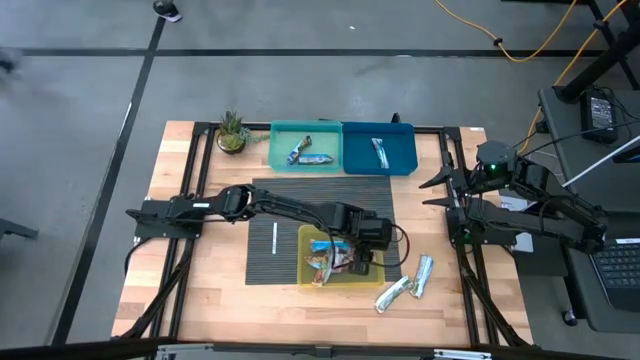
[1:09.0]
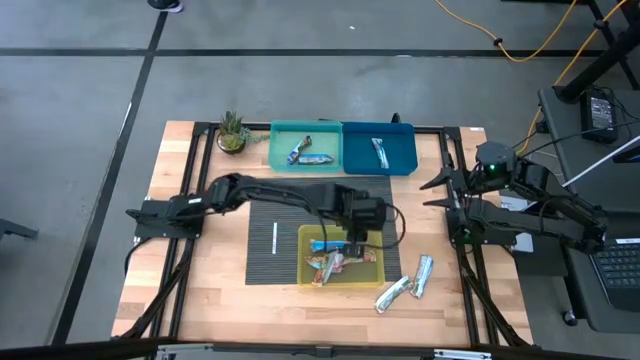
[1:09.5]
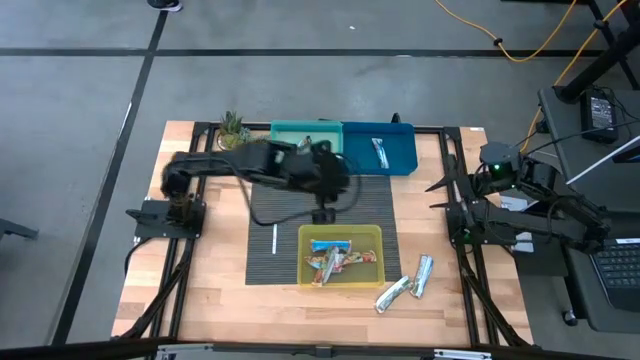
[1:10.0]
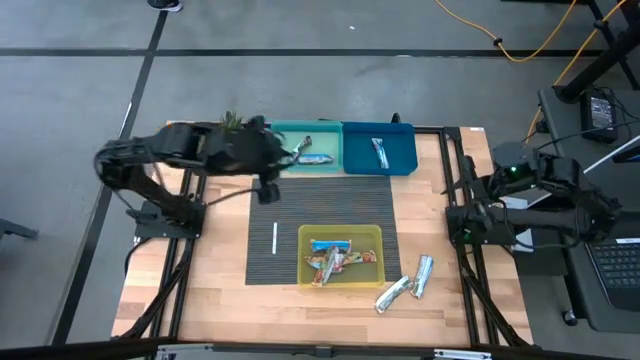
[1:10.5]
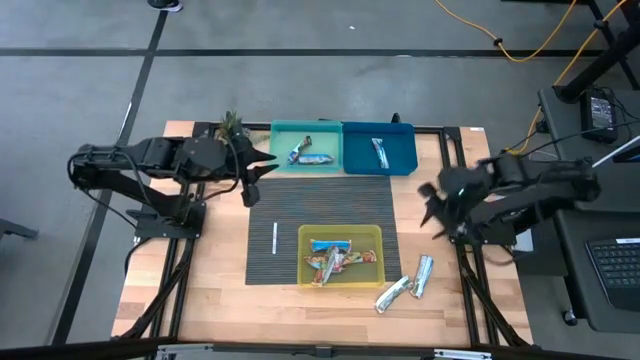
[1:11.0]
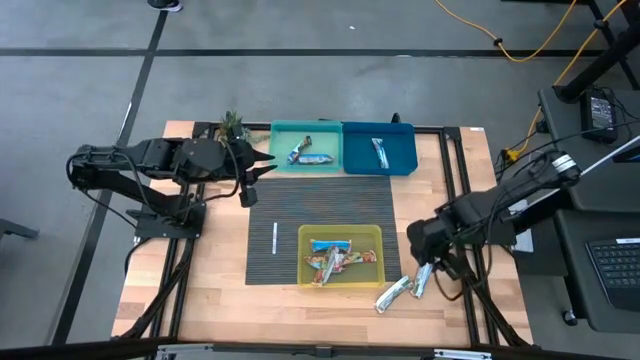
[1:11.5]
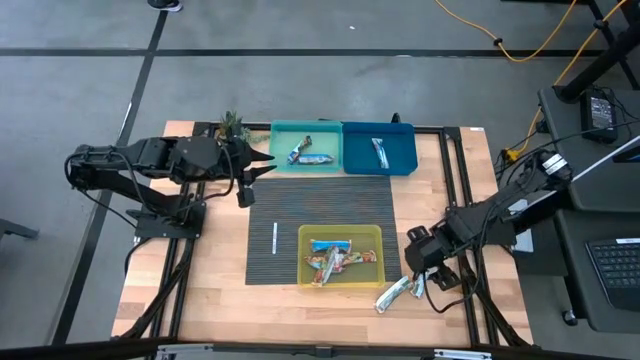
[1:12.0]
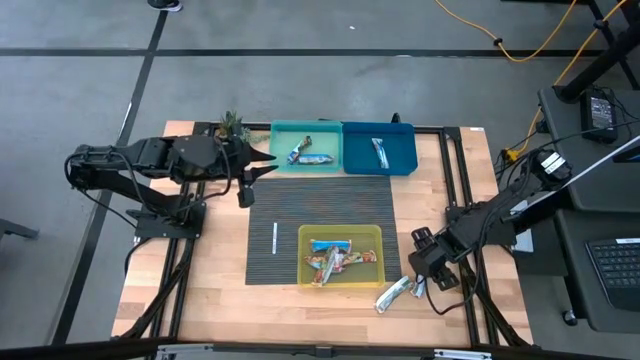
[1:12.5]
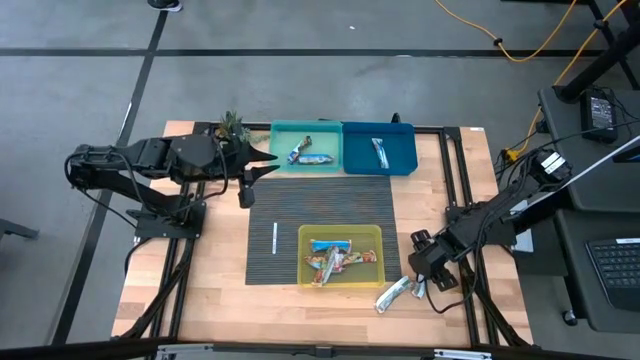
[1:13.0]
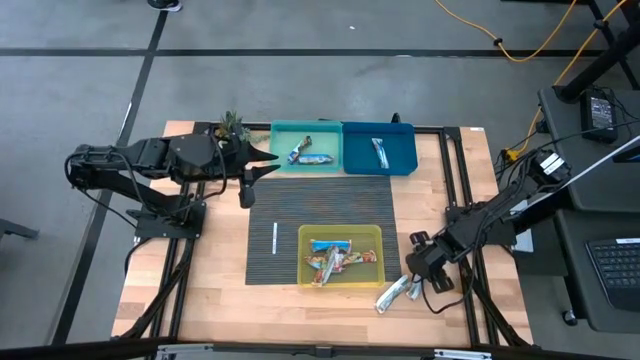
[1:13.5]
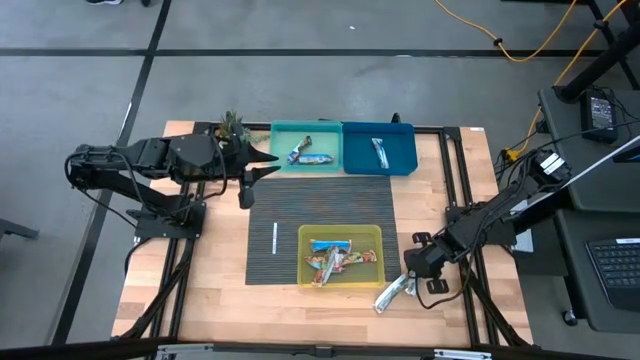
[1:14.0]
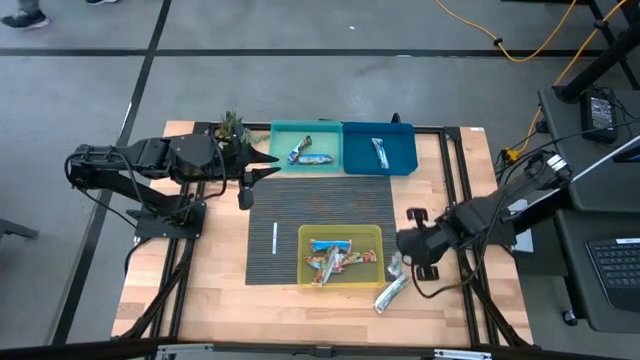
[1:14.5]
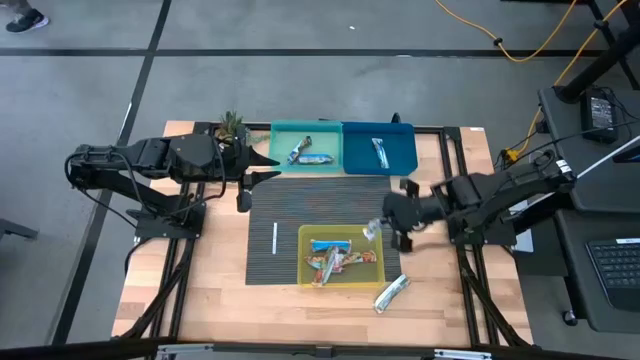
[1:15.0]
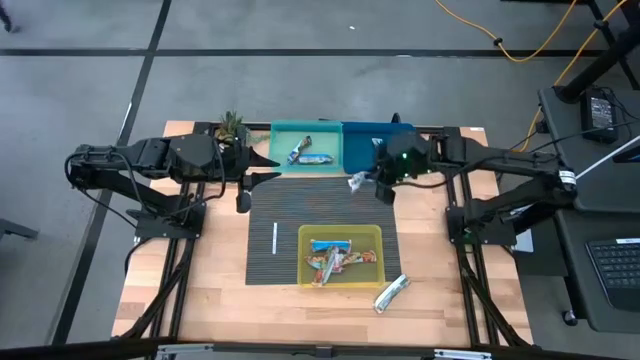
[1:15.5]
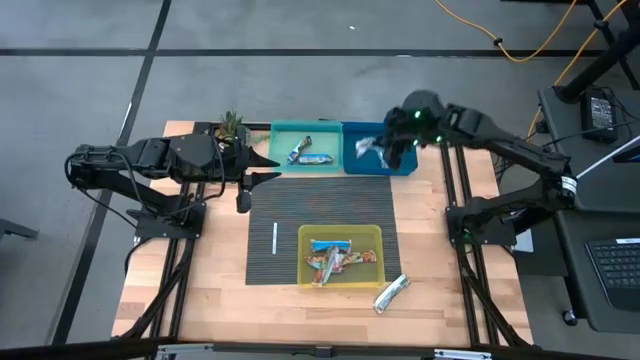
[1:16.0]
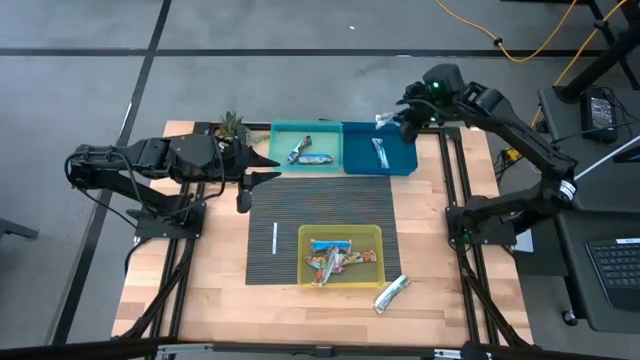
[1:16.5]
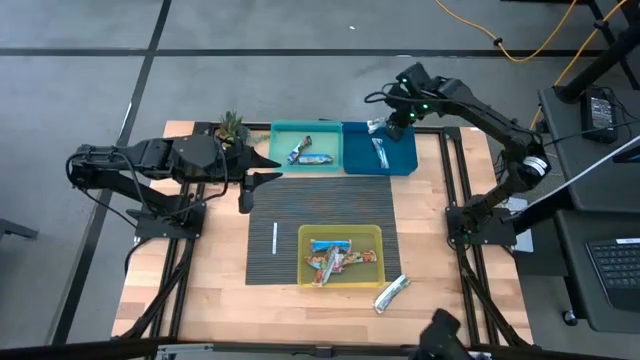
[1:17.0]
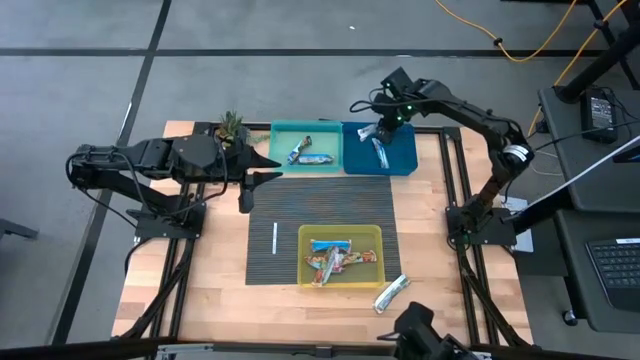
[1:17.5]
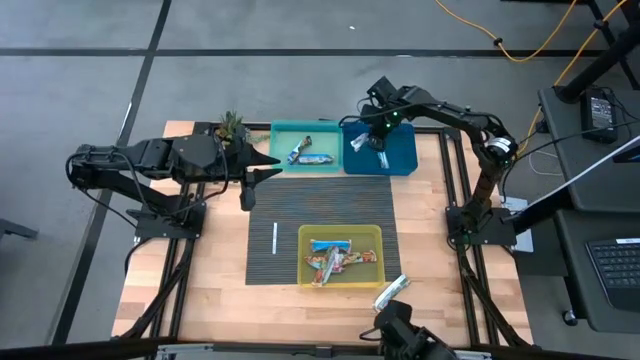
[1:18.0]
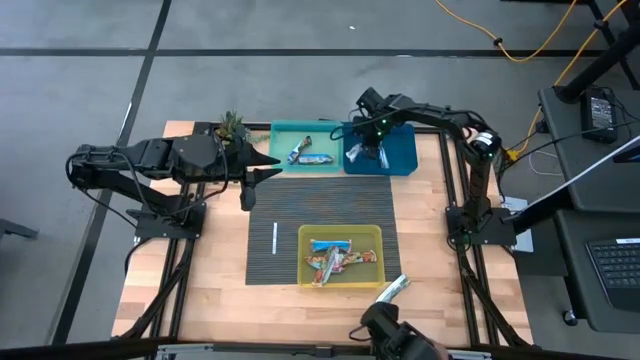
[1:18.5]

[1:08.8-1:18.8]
Task: Pick and place Granola Bars by type
Put the yellow granola bar into the blue bin

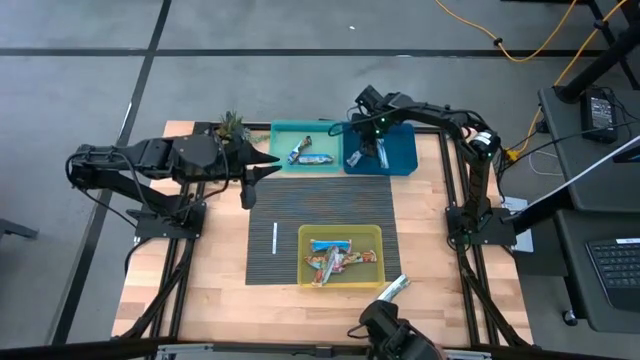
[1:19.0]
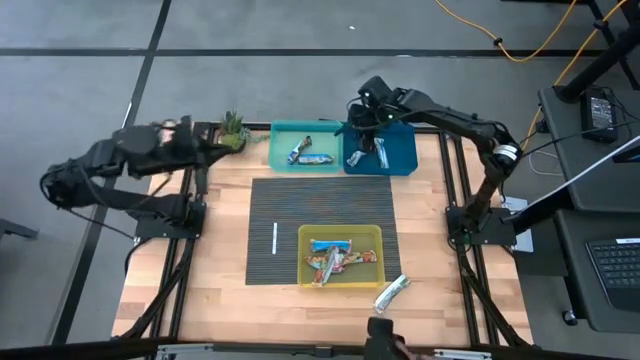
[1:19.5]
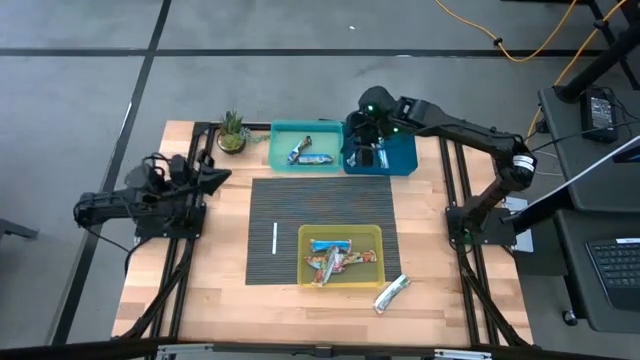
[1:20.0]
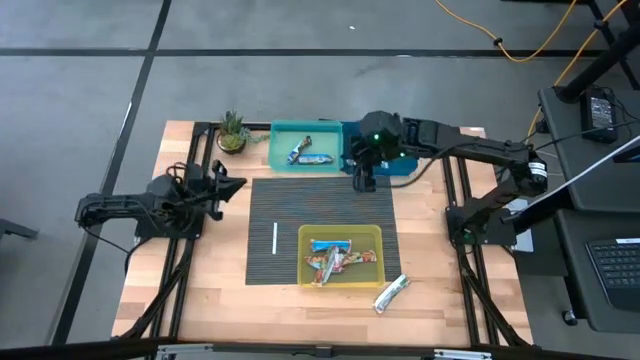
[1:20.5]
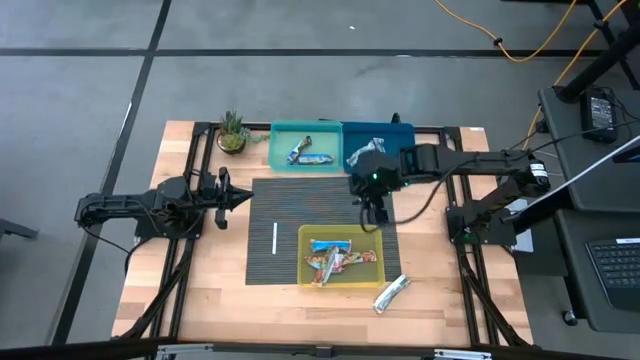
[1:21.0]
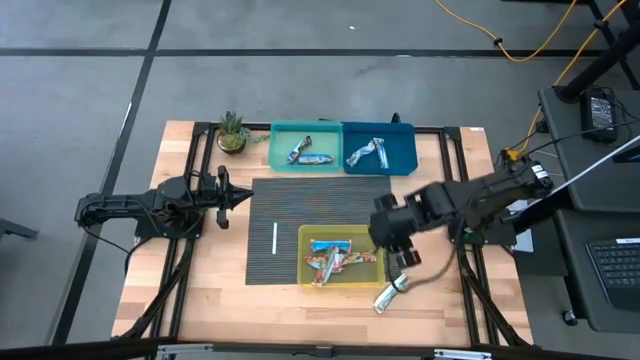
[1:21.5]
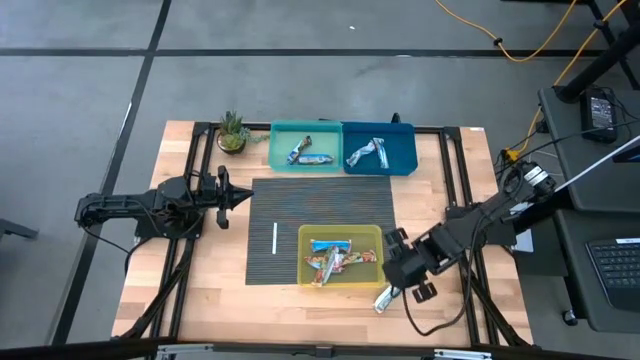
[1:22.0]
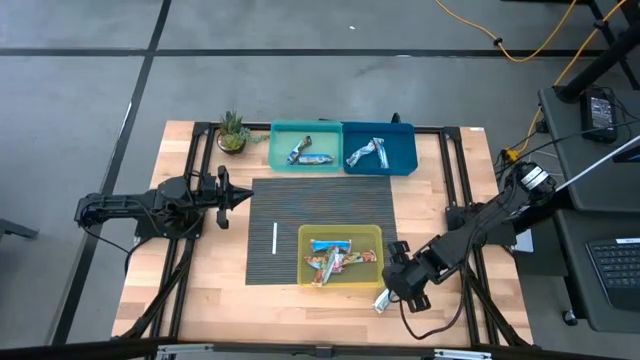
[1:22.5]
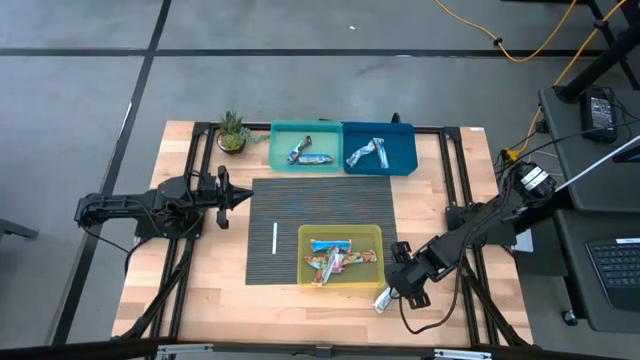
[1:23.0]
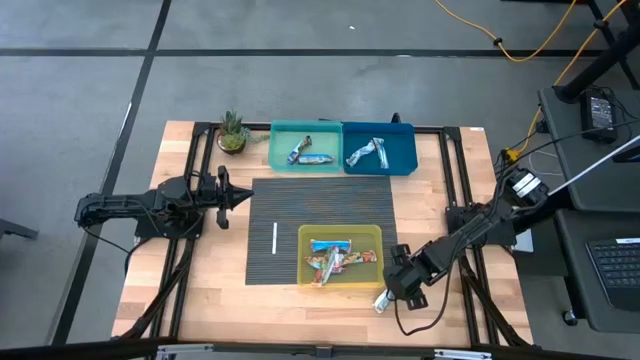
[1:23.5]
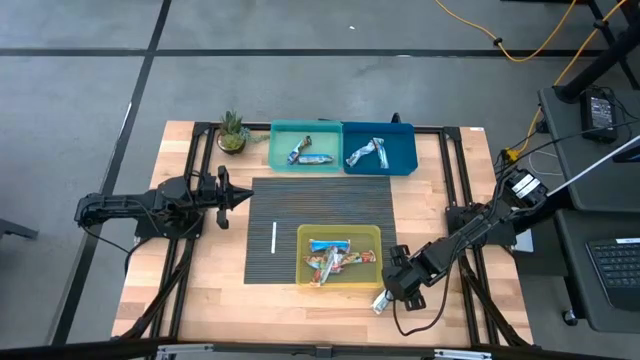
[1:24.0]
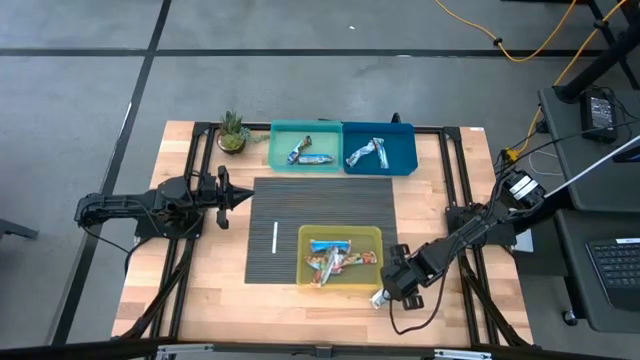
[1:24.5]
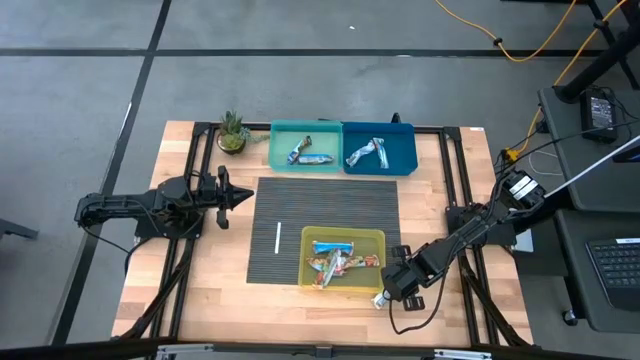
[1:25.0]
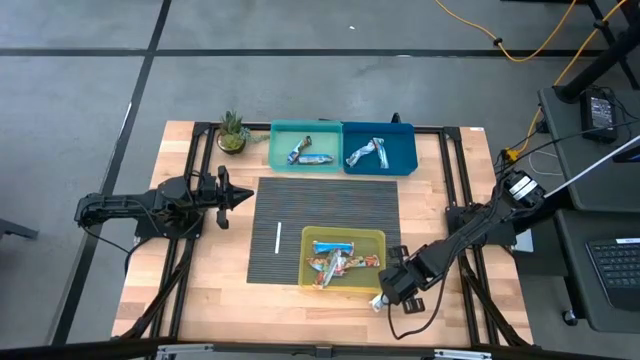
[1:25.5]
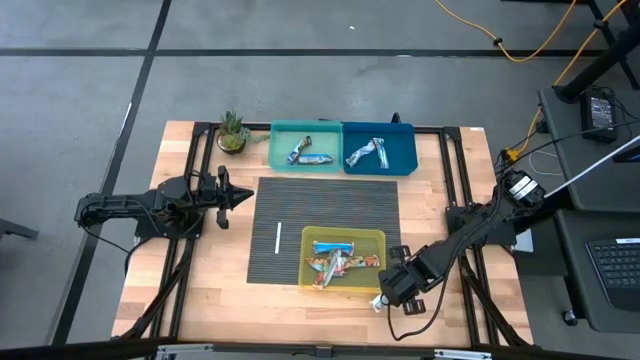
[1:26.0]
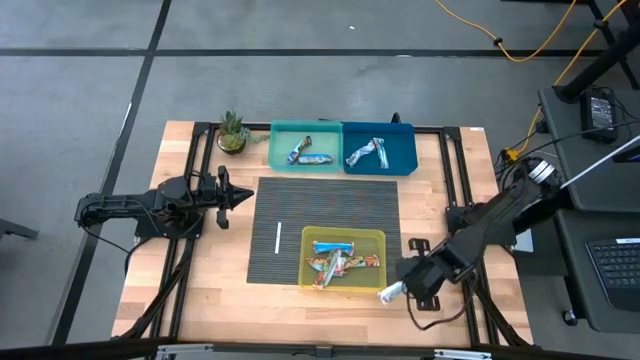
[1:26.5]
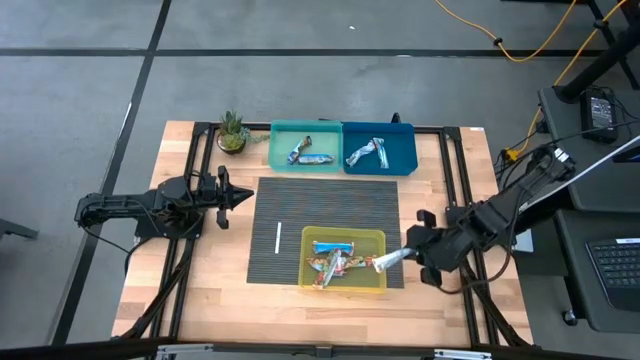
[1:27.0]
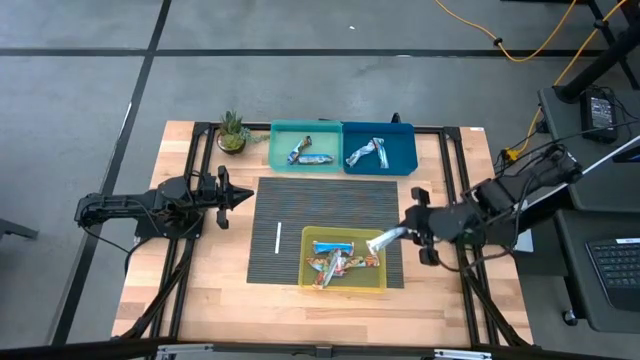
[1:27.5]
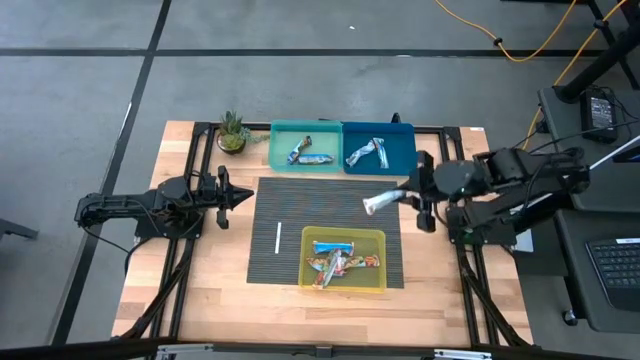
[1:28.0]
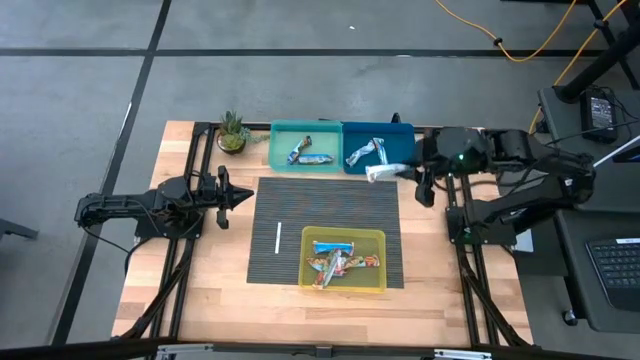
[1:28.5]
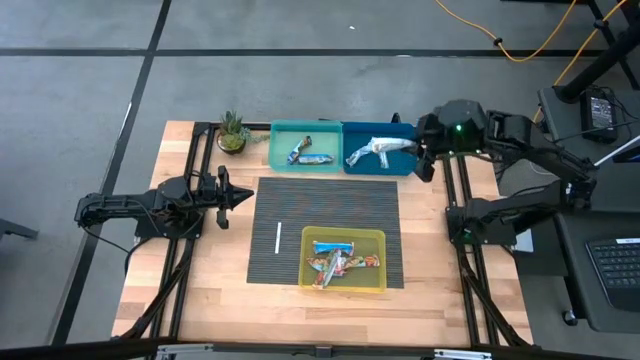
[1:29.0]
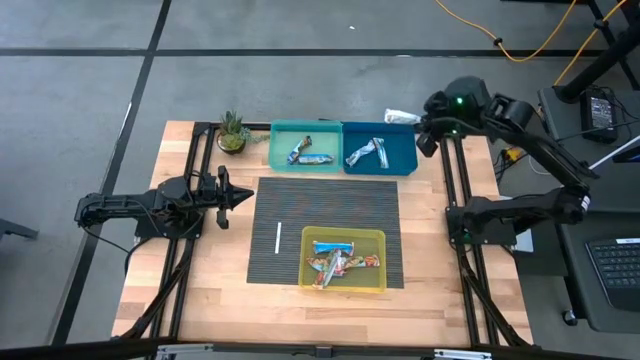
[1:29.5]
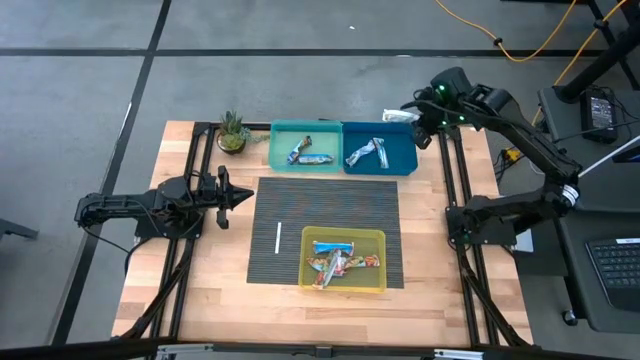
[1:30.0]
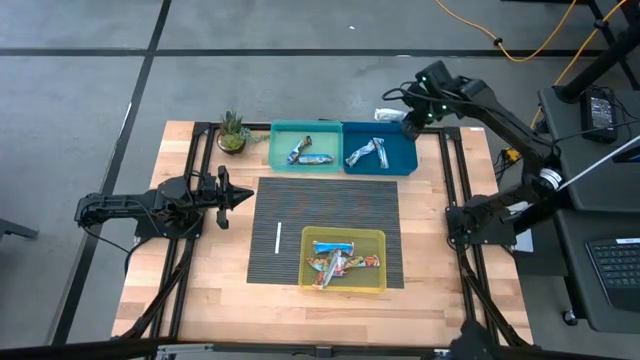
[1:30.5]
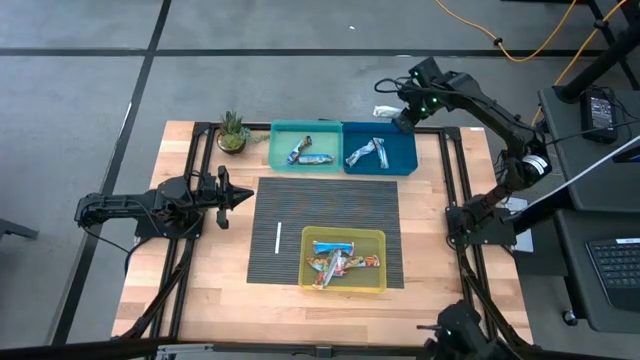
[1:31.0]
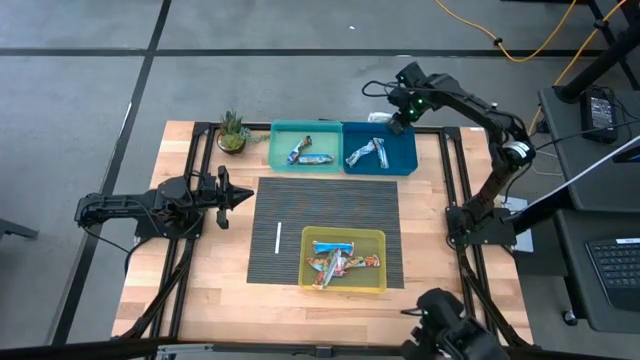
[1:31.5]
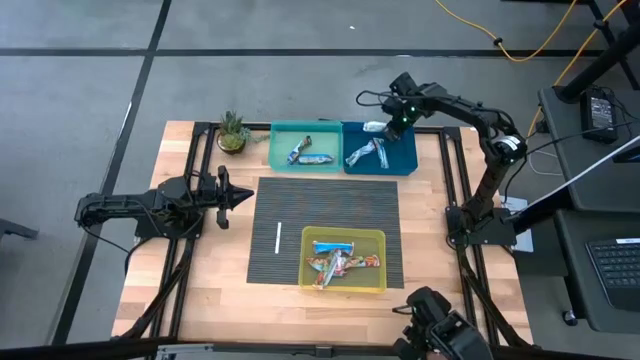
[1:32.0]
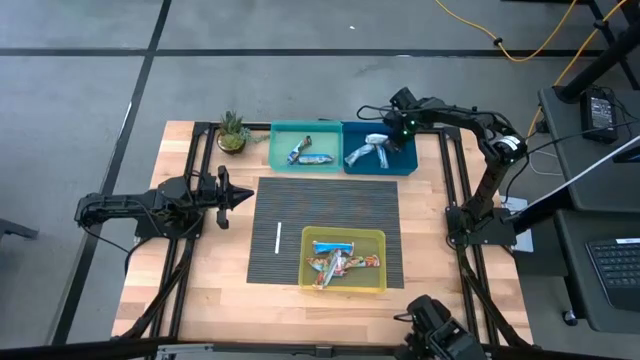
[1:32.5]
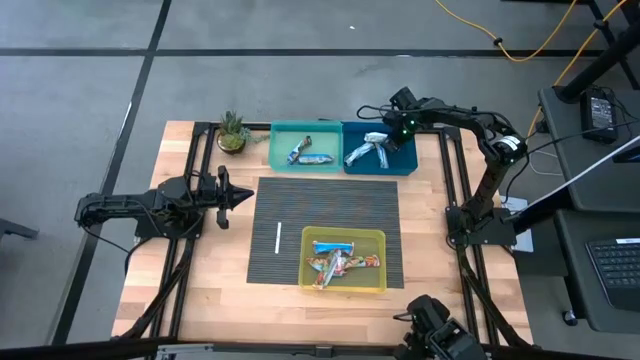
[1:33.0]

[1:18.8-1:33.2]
Put the yellow granola bar into the blue bin
